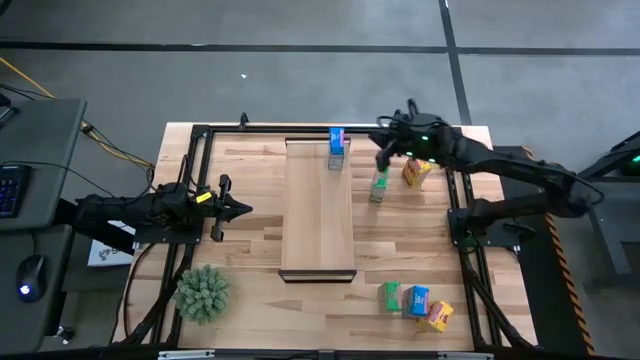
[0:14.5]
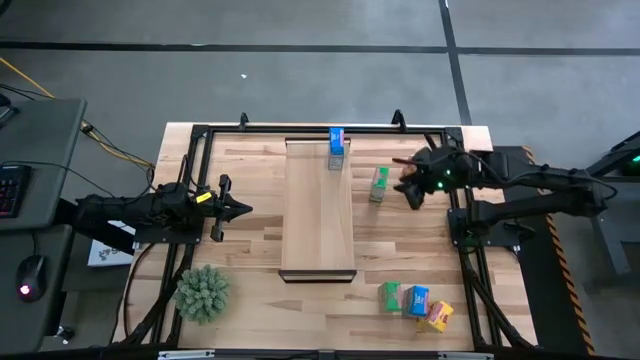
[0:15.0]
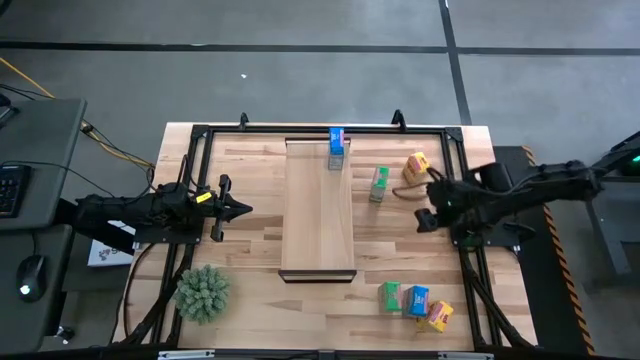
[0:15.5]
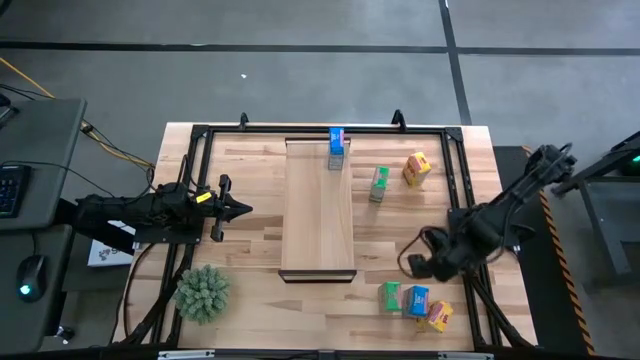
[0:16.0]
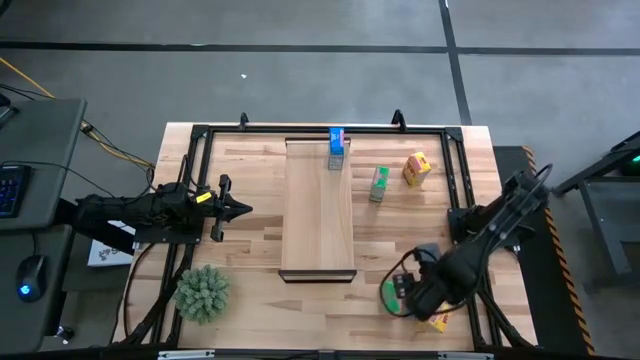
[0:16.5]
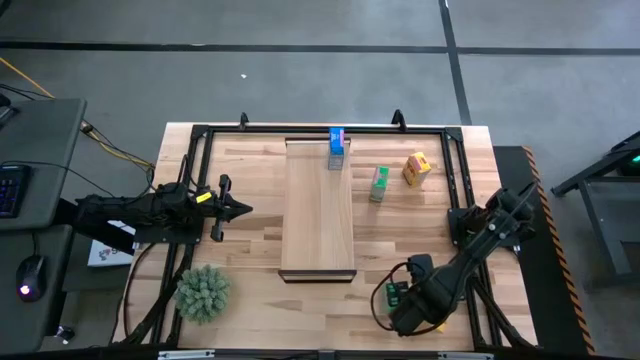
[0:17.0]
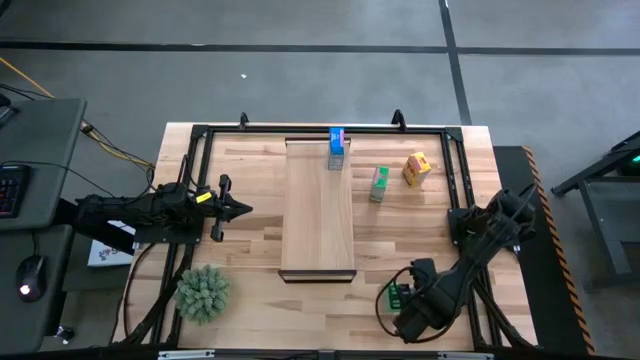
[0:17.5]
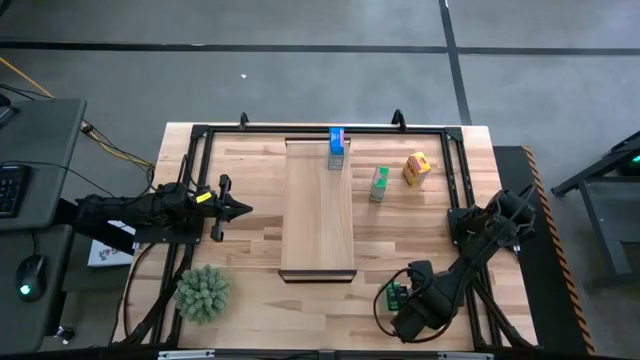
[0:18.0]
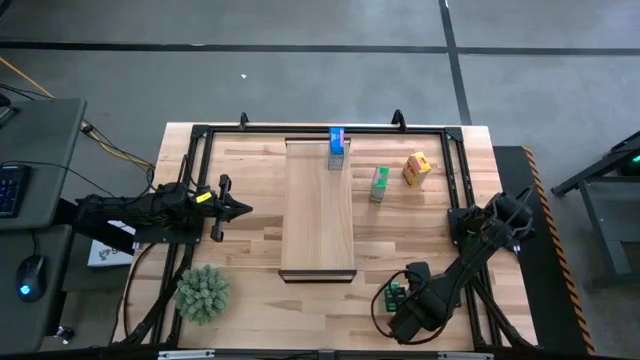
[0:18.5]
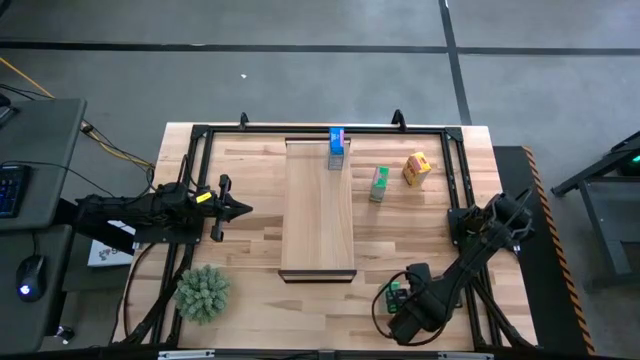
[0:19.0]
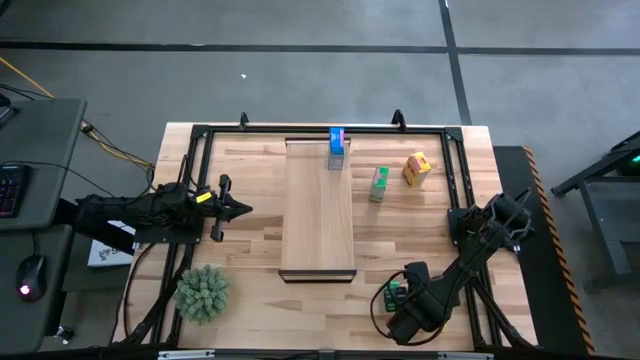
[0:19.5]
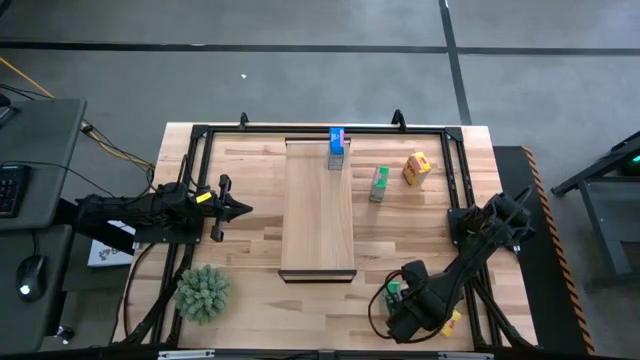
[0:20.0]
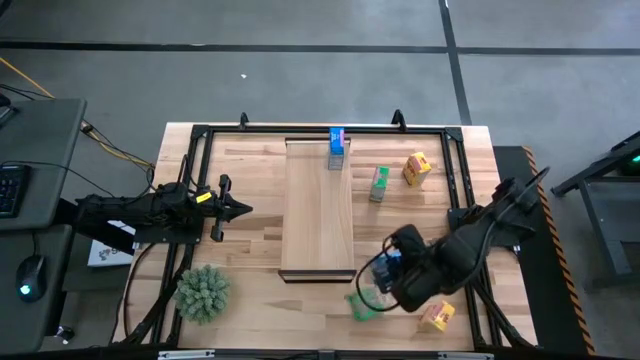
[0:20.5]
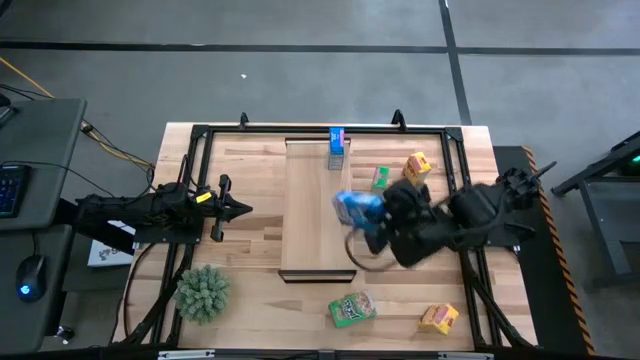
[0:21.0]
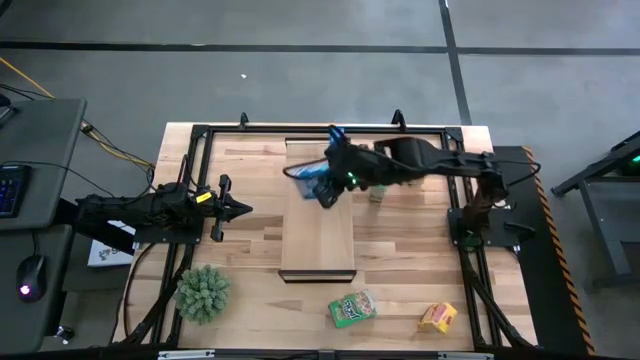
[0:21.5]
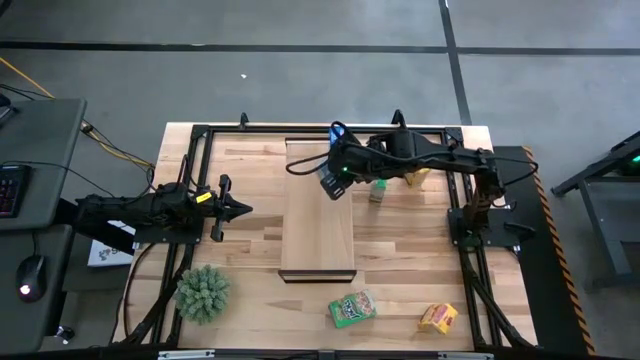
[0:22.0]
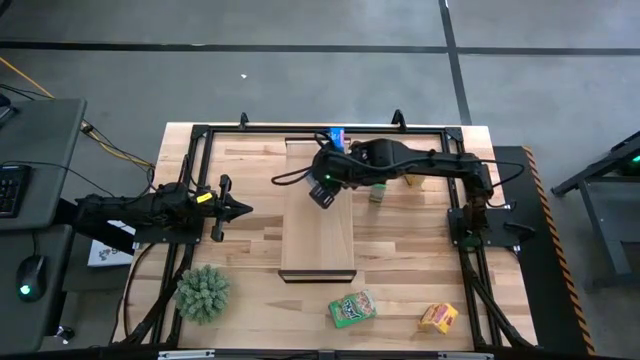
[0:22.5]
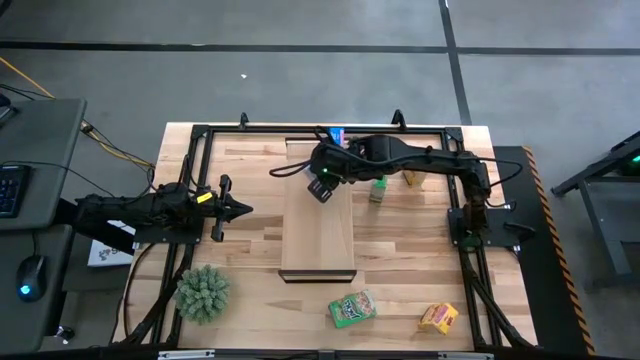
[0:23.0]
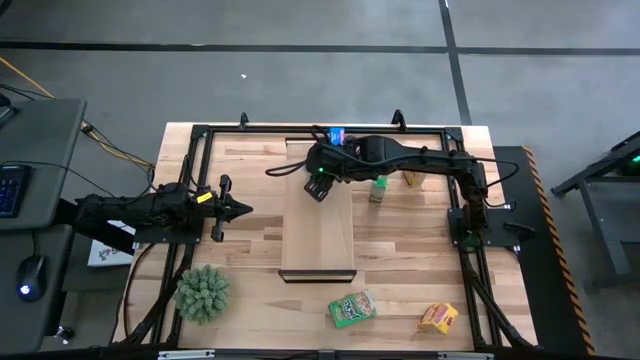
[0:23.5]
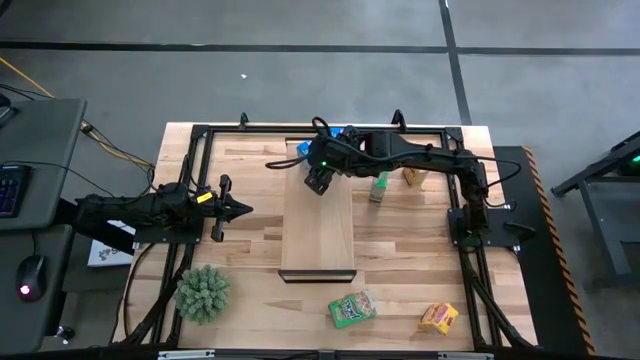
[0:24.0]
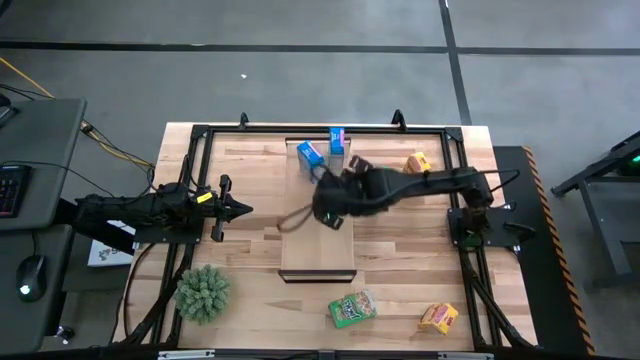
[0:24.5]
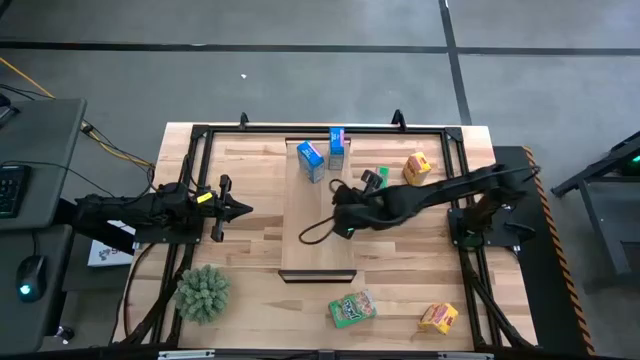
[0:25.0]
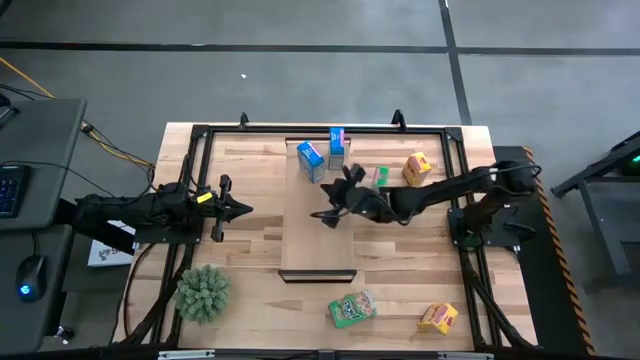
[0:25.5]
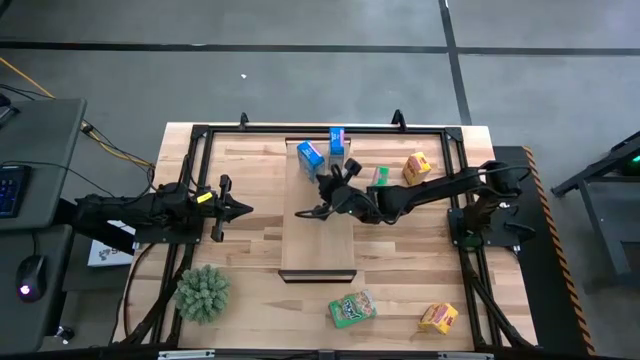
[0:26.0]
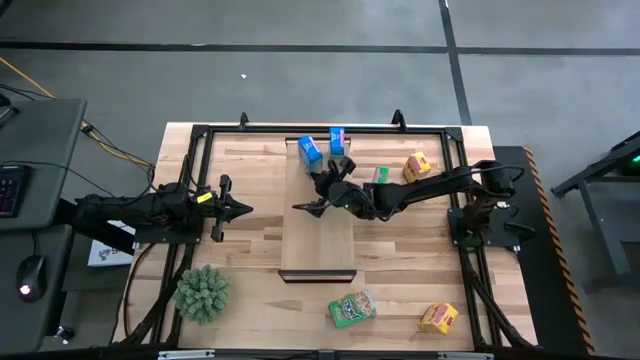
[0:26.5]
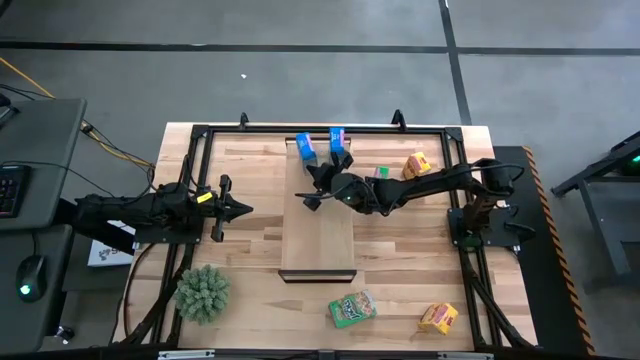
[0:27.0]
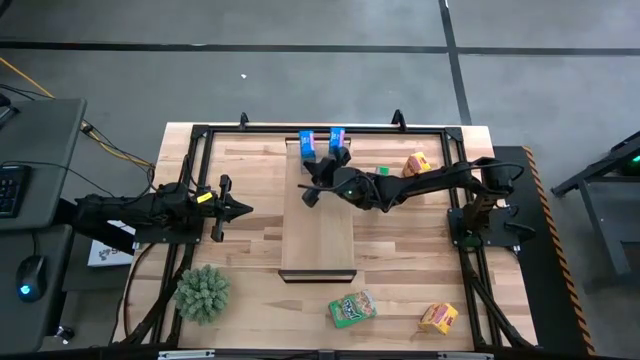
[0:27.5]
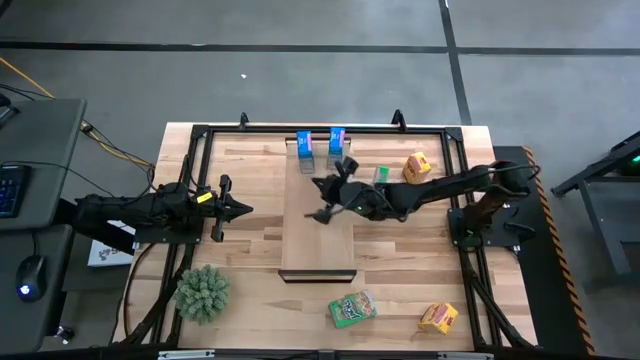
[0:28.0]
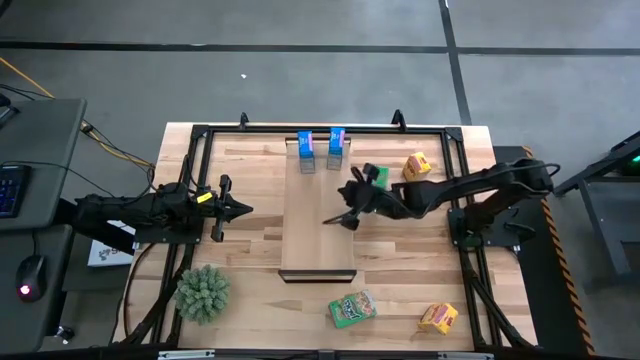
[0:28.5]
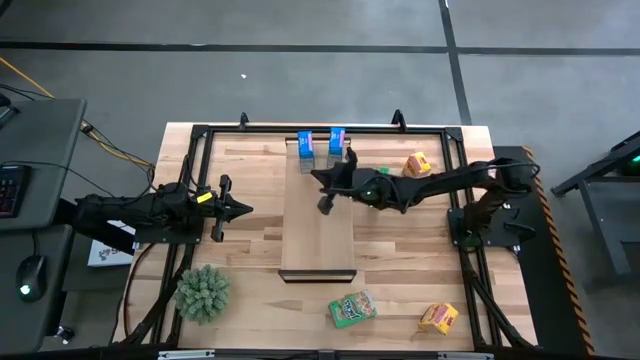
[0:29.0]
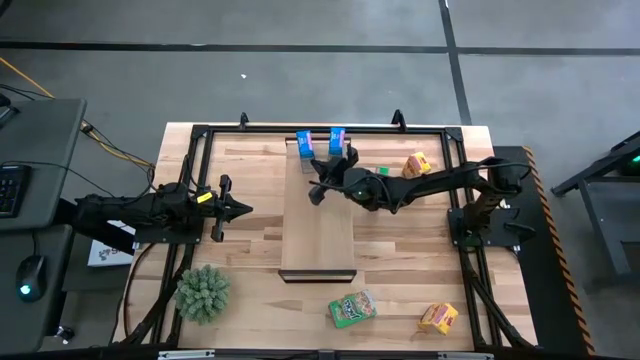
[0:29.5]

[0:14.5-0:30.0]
Task: Stack cereal on shelf
Put the blue cereal box on the shelf aligned with the other blue cereal box

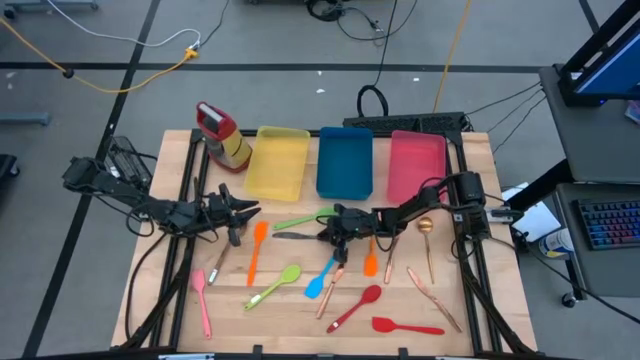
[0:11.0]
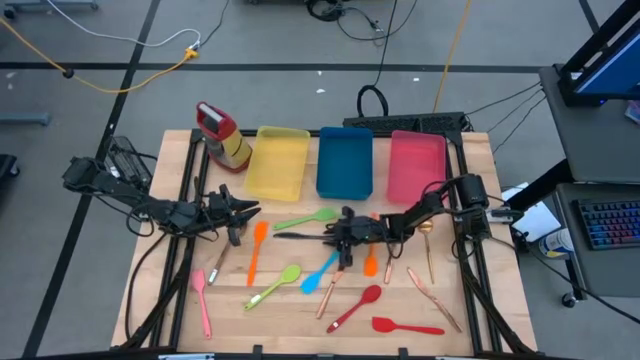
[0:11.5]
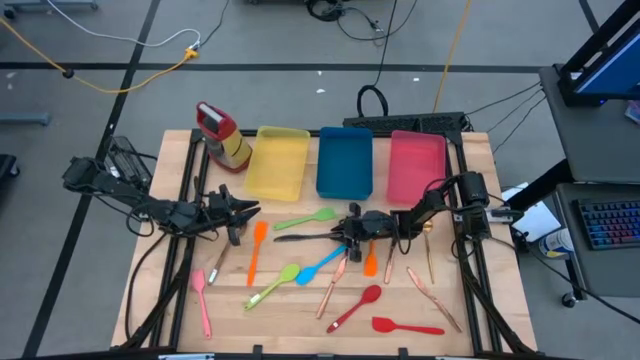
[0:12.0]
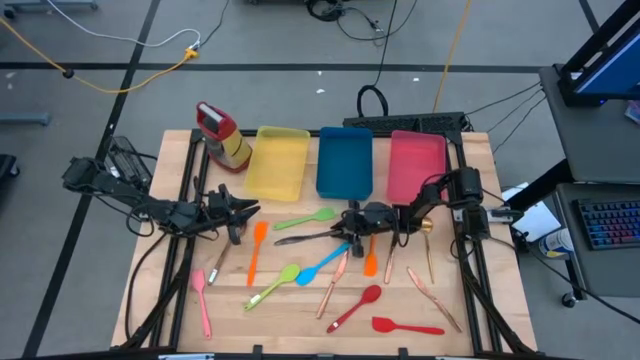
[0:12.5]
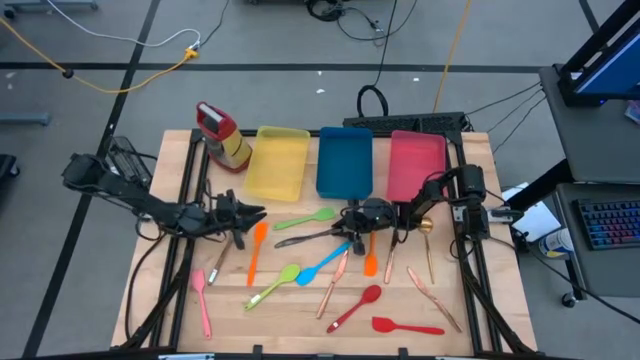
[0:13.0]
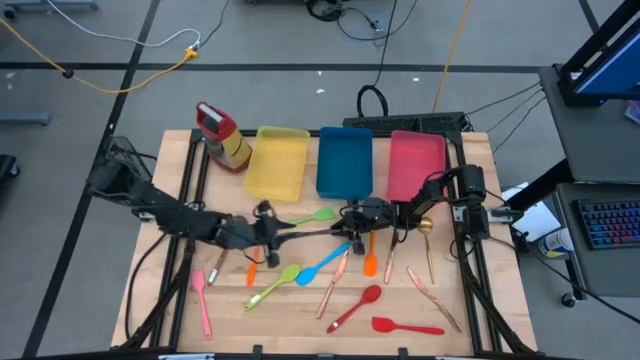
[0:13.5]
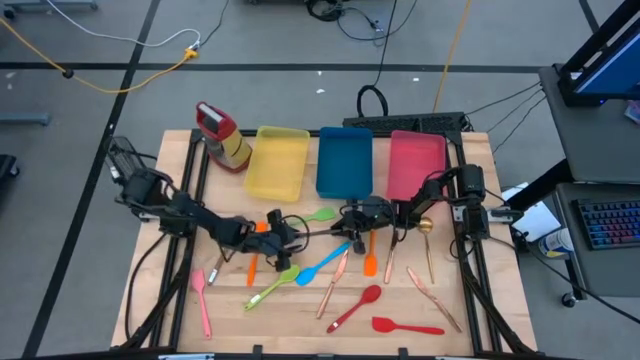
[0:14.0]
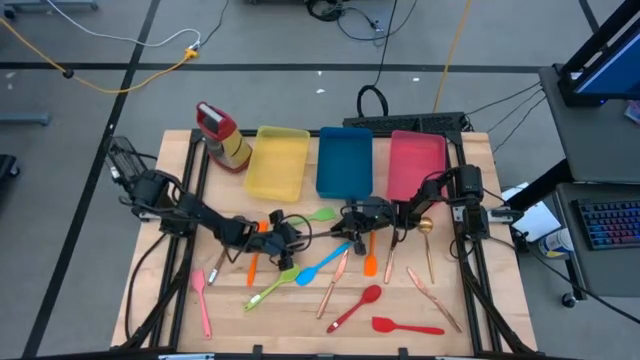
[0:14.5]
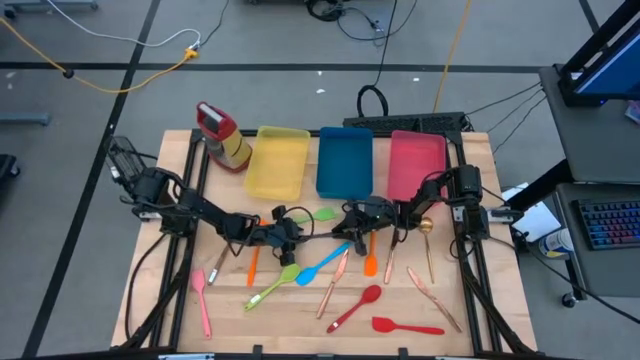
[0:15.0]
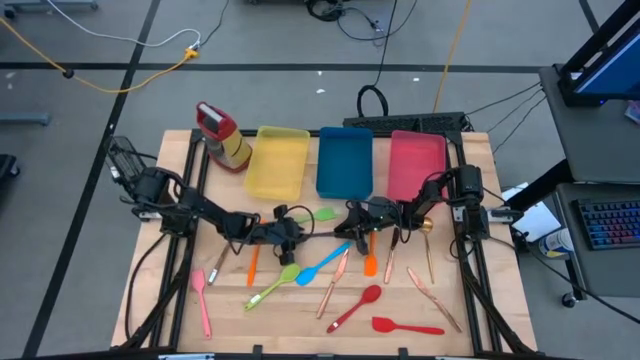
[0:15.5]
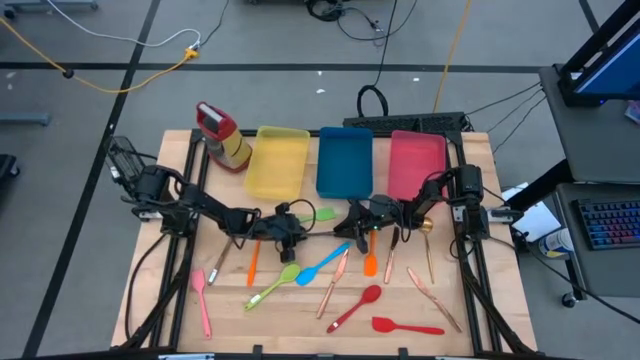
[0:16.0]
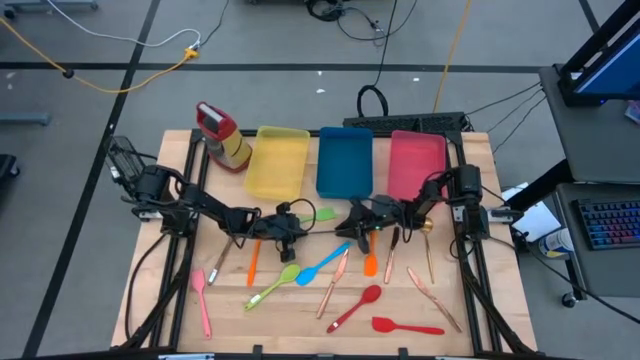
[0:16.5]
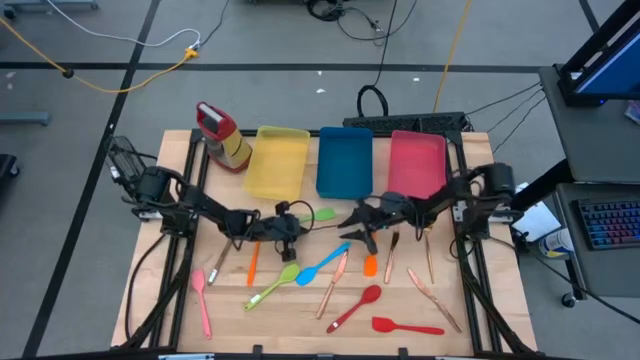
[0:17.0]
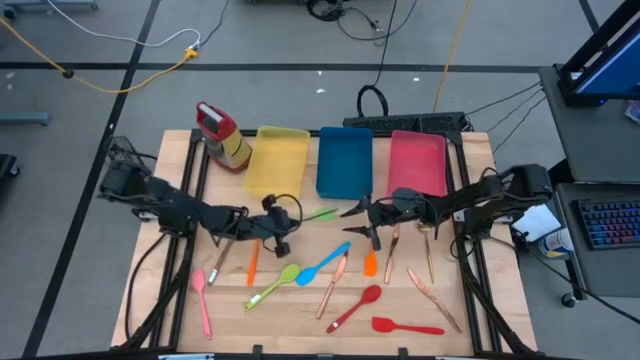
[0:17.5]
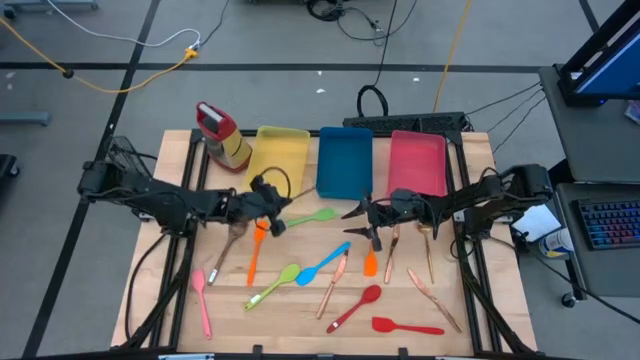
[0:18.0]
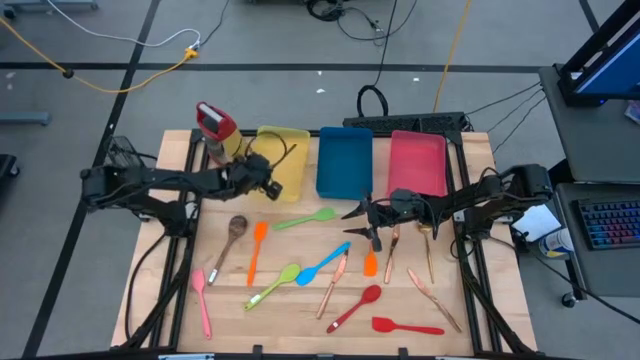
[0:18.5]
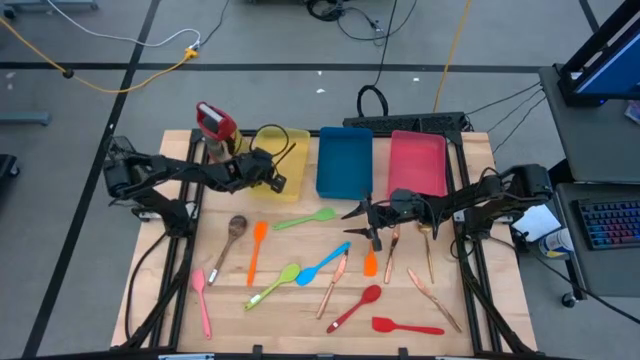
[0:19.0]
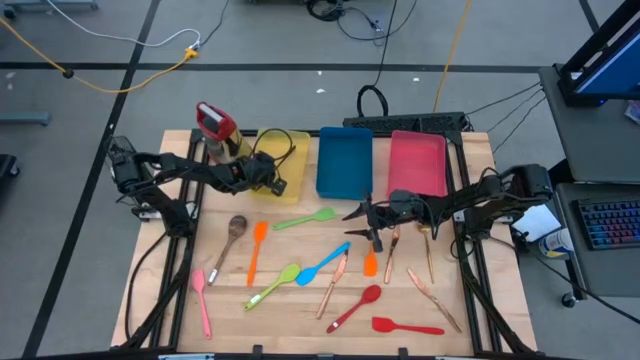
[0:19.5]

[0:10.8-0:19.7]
Task: Pick & Place Kitchen Items
Put the black knife into the yellow bin
